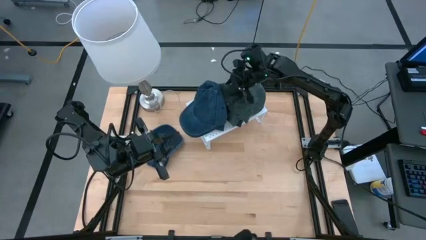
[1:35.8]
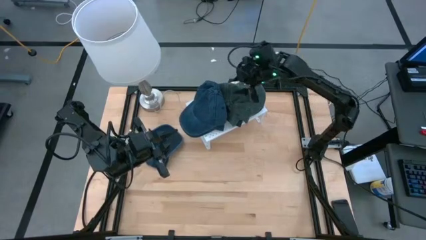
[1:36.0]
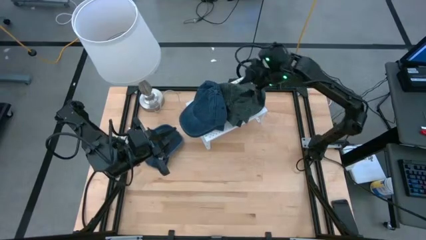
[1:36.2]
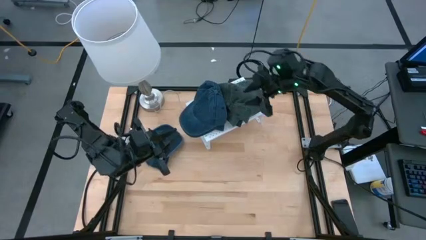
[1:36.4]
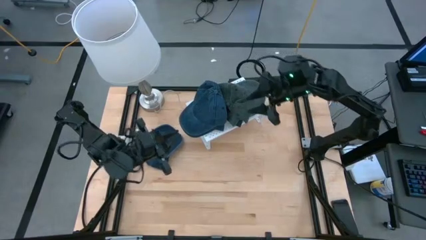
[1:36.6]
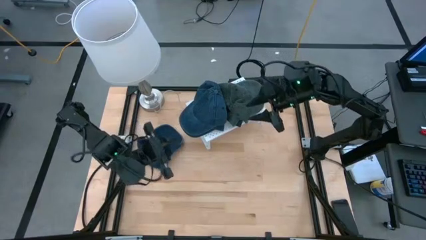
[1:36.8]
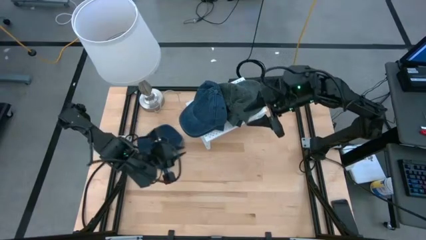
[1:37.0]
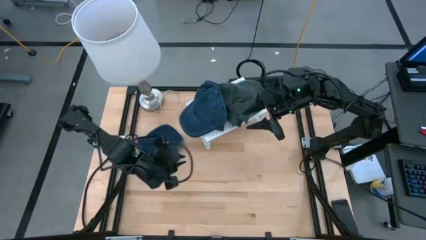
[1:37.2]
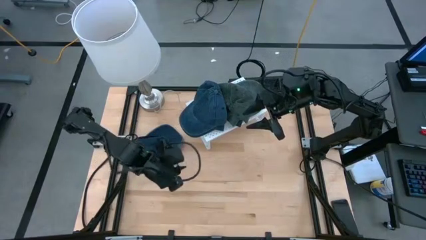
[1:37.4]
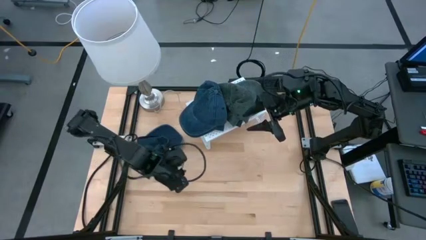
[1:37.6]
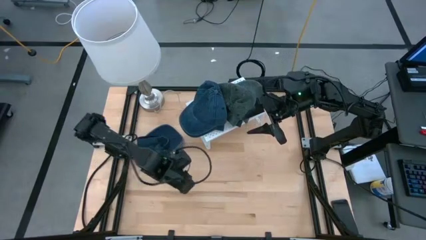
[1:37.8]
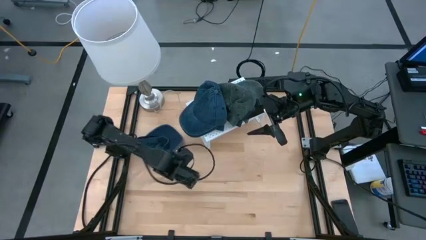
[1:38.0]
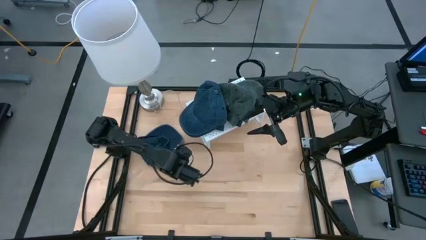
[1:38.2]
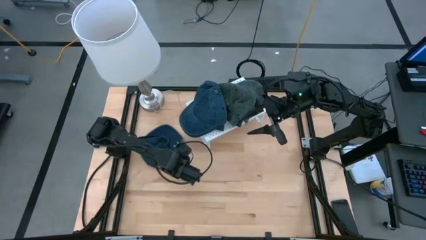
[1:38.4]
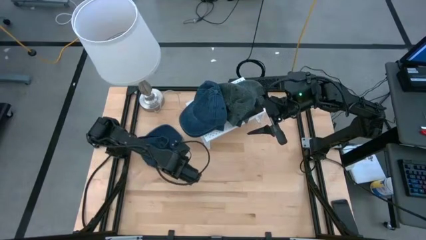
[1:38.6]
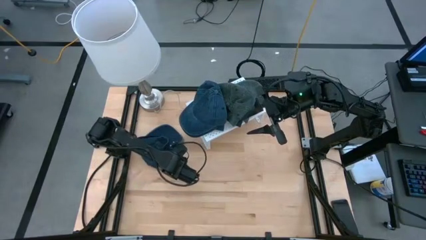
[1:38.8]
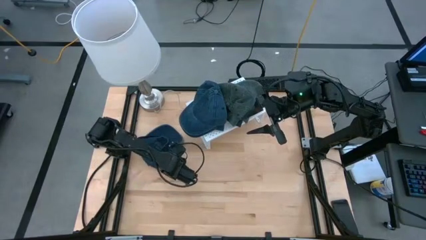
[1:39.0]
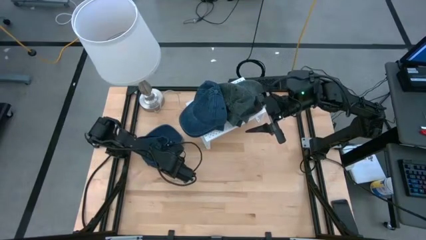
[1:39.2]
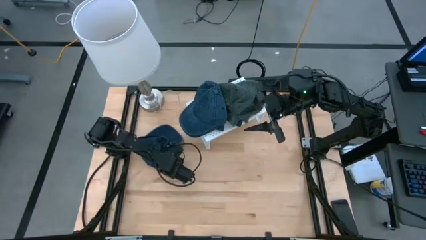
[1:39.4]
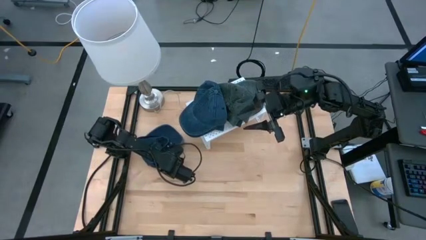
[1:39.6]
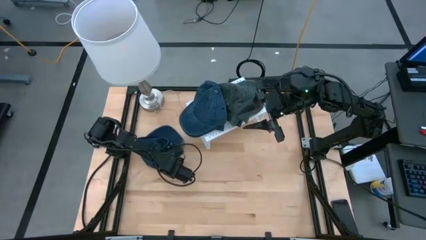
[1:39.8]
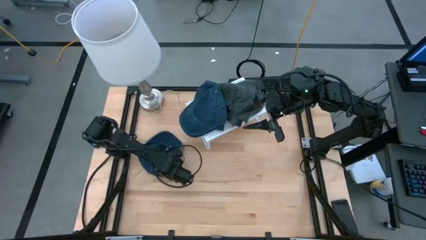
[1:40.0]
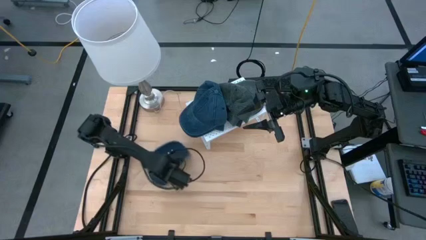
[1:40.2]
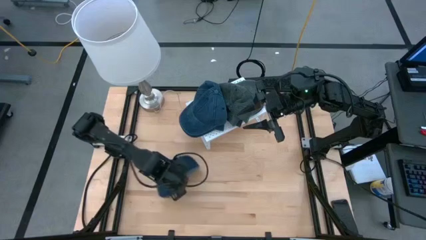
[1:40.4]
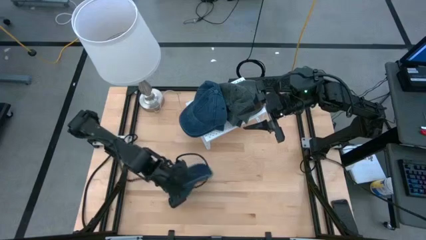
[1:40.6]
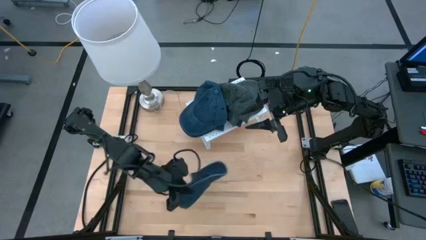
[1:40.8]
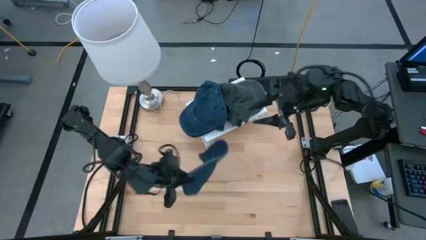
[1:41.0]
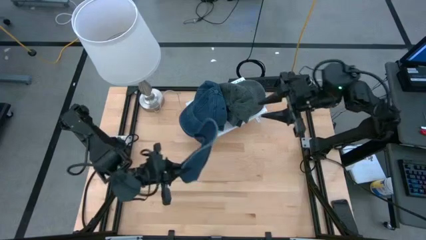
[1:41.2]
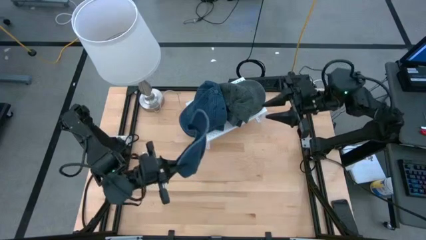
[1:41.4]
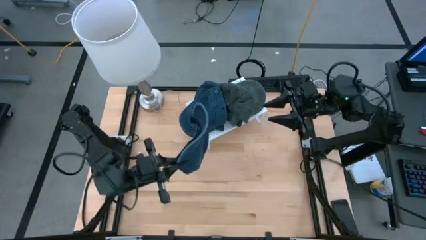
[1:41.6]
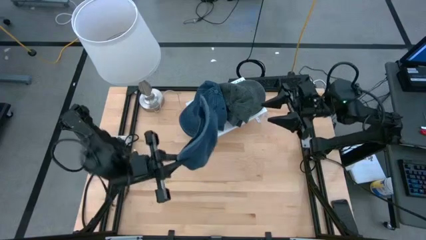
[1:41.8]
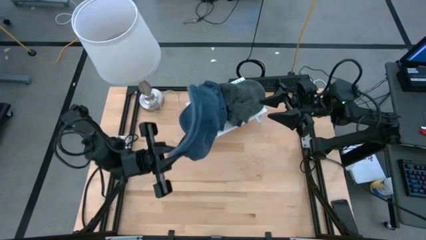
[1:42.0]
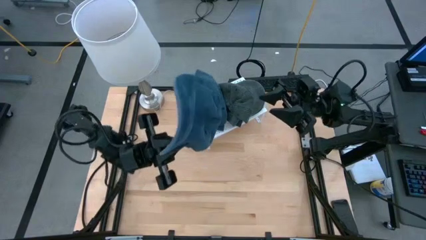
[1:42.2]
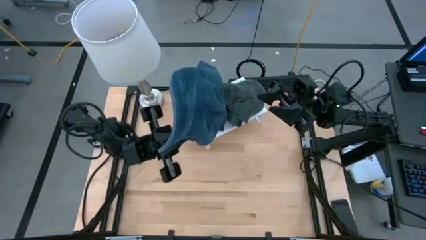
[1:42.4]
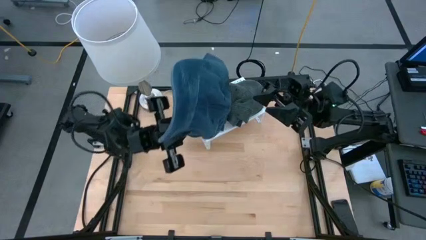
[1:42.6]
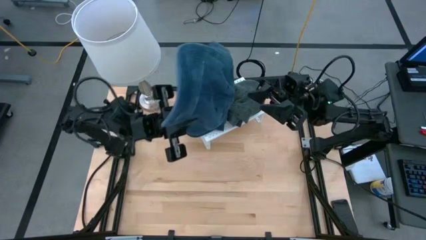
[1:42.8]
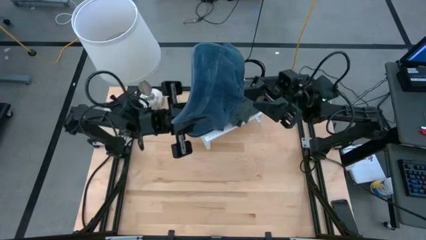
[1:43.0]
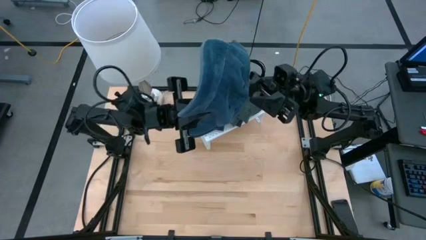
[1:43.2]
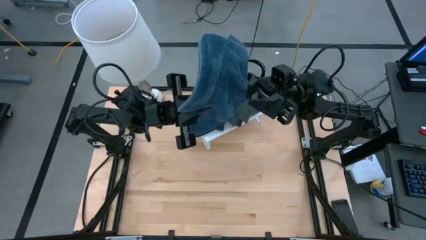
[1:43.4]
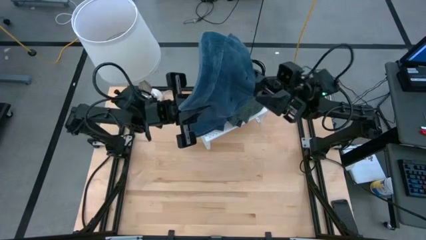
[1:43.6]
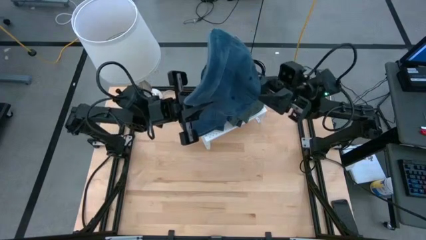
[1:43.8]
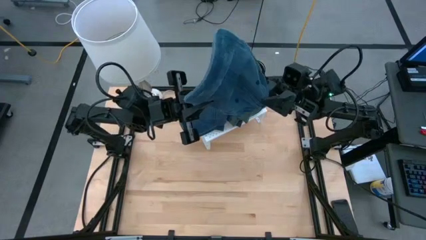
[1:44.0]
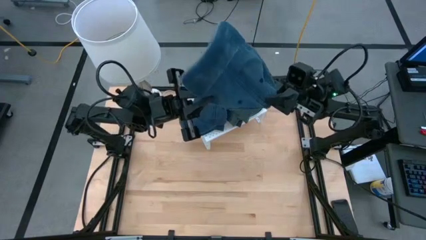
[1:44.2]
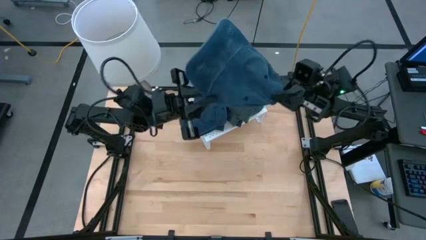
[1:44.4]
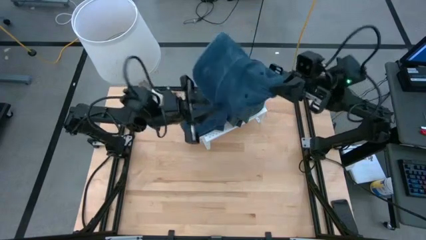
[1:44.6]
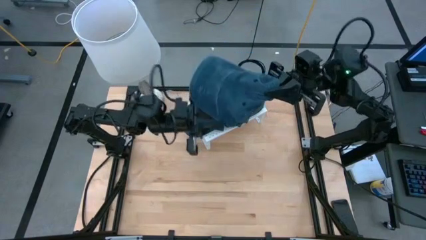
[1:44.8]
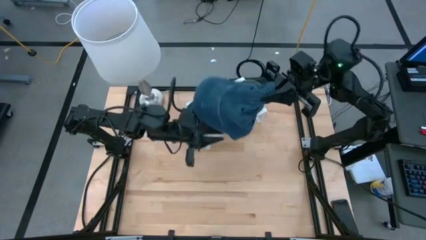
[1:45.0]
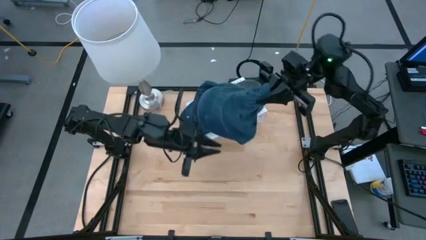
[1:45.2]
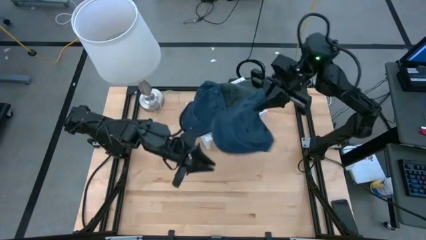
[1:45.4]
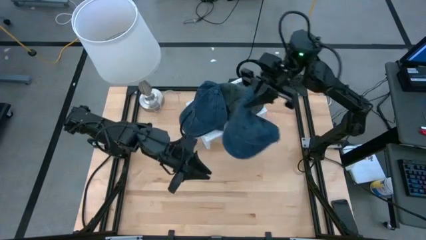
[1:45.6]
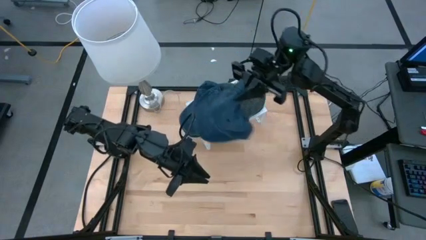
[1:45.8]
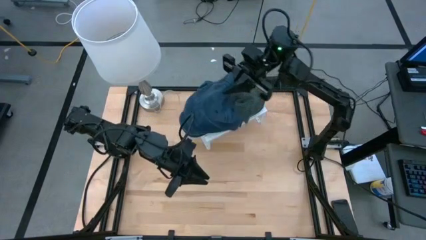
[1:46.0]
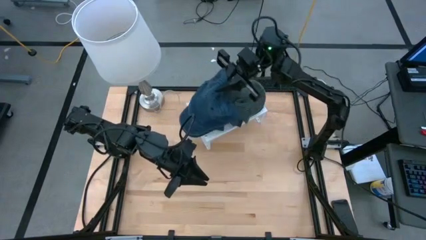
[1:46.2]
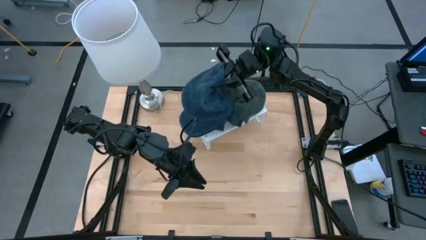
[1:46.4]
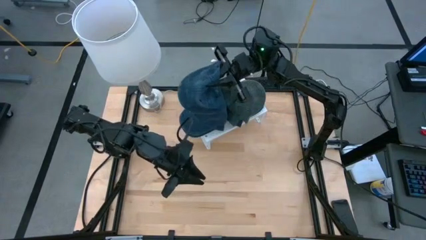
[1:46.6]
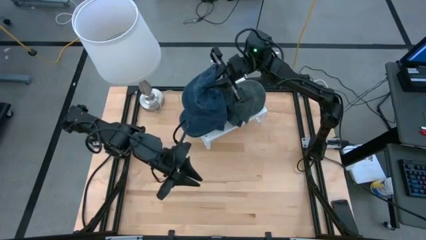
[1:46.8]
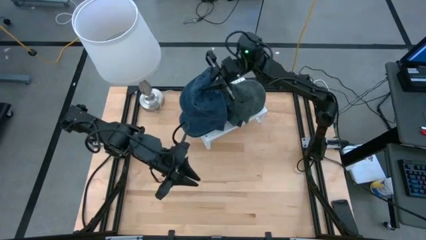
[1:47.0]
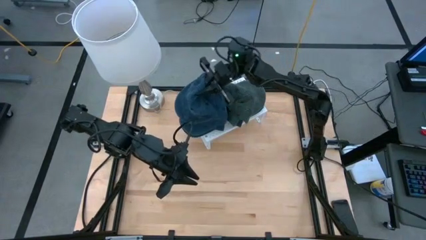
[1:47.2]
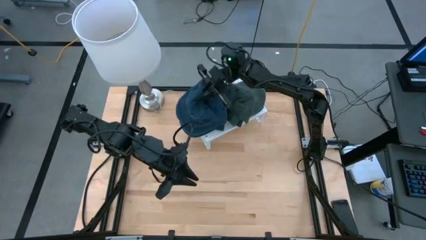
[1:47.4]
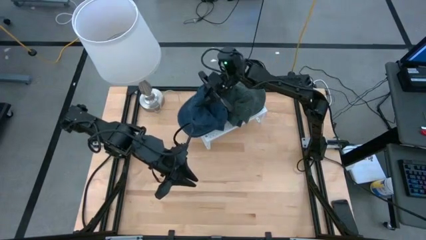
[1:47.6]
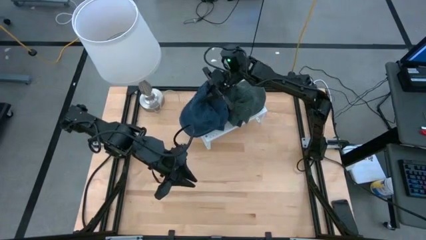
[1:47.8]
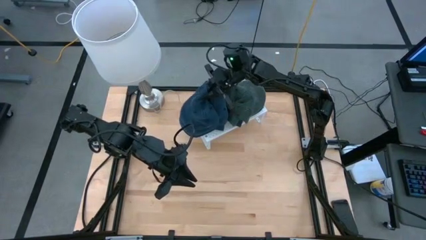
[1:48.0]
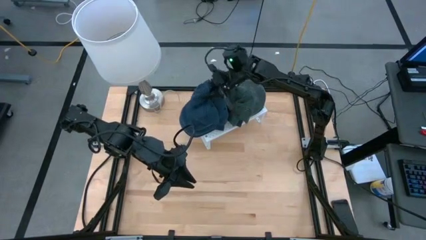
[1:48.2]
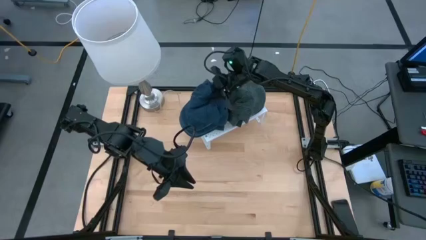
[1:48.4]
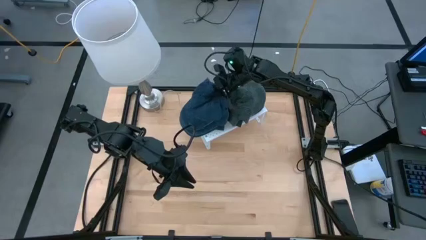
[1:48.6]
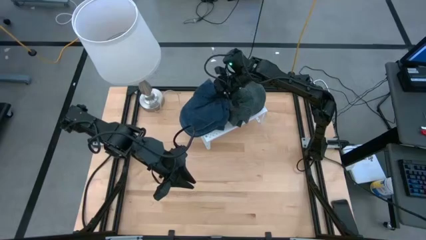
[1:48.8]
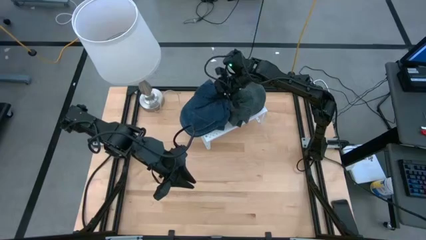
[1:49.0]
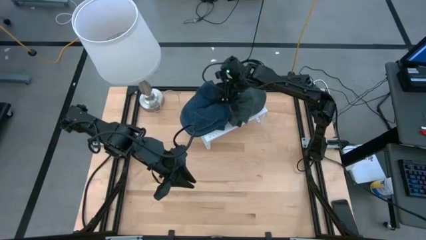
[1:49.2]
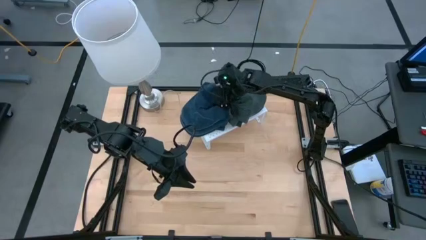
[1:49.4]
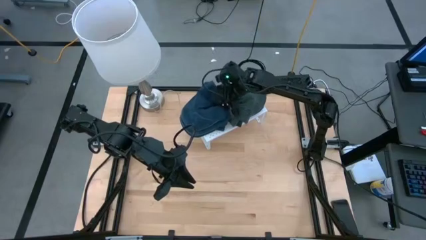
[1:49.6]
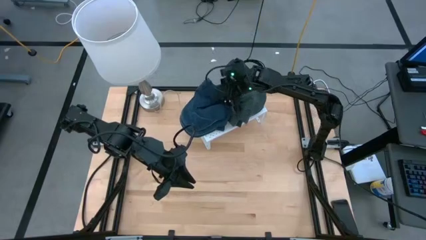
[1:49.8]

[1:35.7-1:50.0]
Task: Pick & Place hat
Stack the blue cap on top of the other blue caps on the shelf
